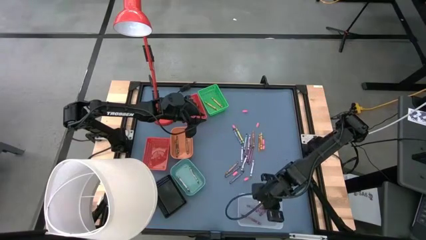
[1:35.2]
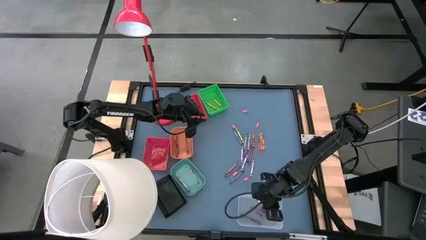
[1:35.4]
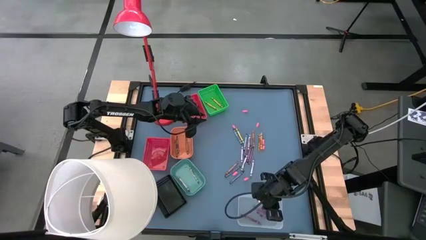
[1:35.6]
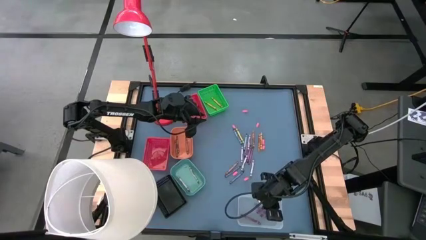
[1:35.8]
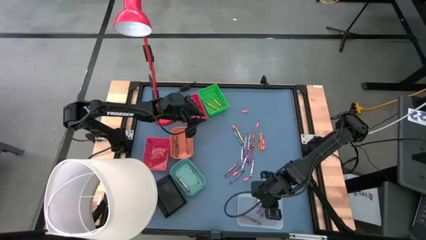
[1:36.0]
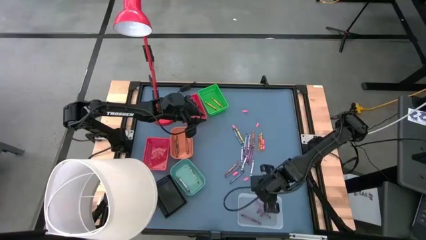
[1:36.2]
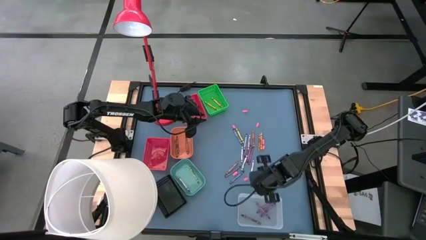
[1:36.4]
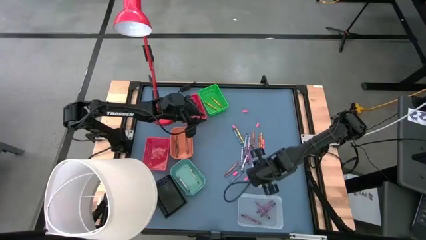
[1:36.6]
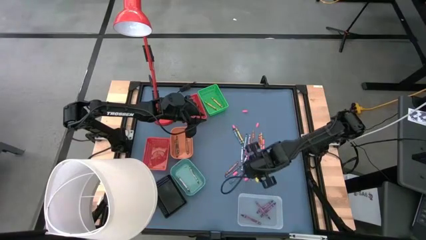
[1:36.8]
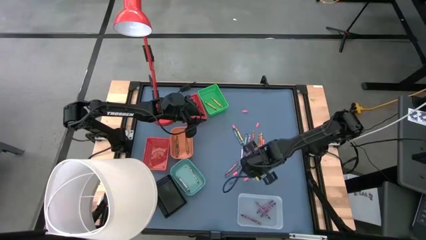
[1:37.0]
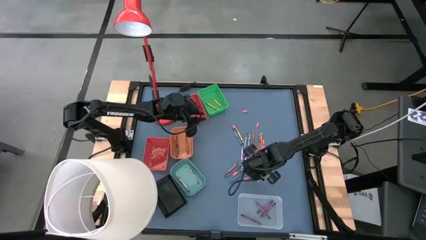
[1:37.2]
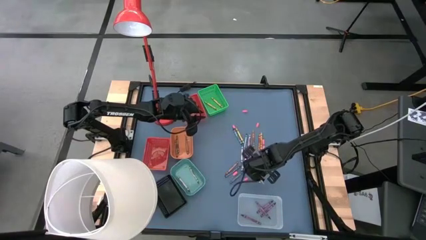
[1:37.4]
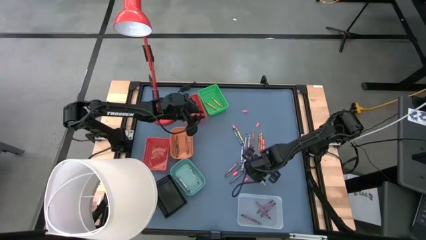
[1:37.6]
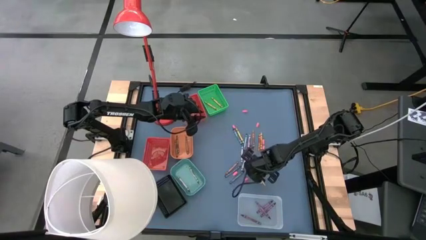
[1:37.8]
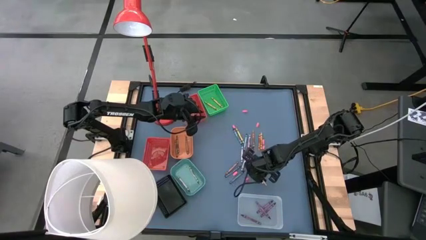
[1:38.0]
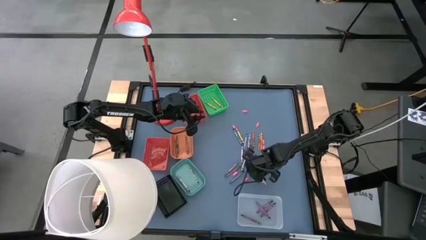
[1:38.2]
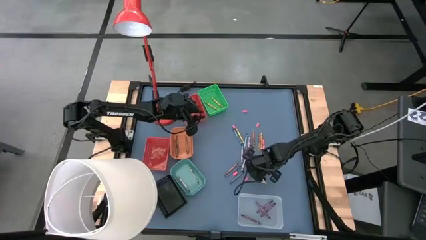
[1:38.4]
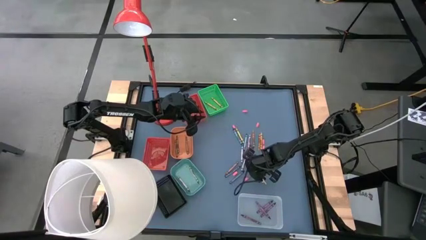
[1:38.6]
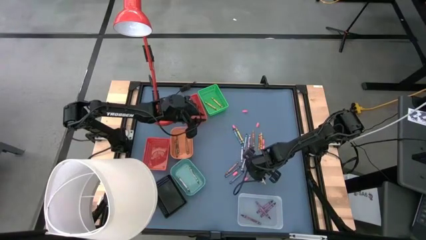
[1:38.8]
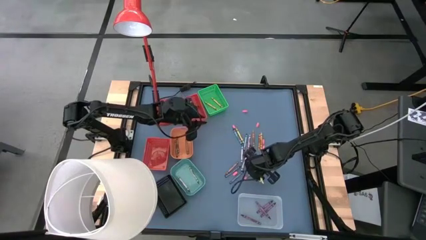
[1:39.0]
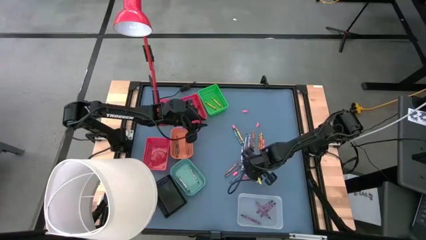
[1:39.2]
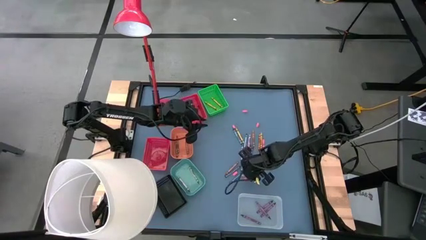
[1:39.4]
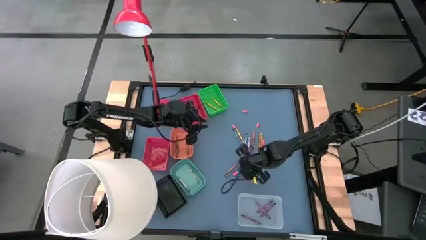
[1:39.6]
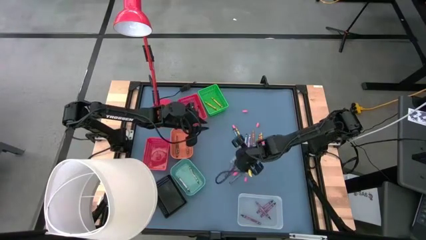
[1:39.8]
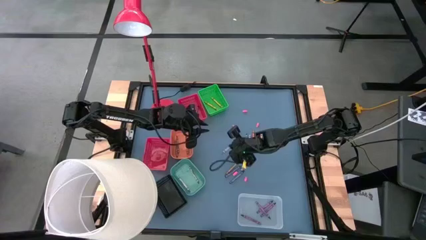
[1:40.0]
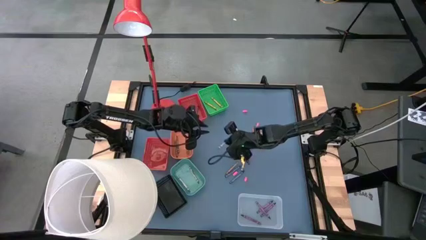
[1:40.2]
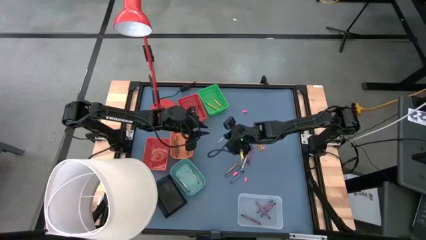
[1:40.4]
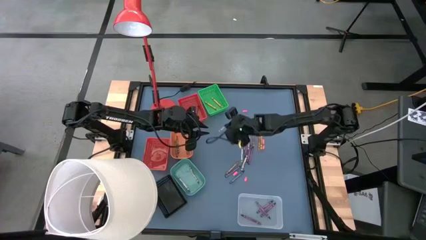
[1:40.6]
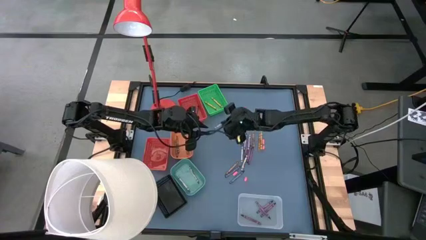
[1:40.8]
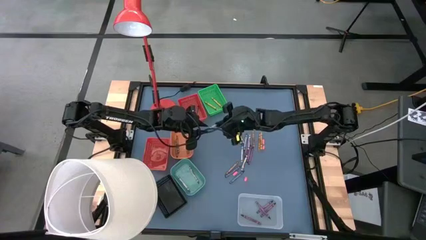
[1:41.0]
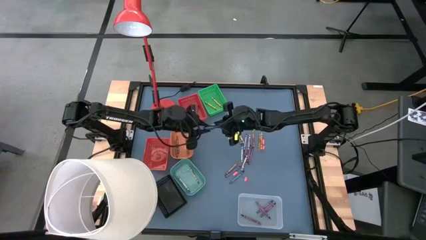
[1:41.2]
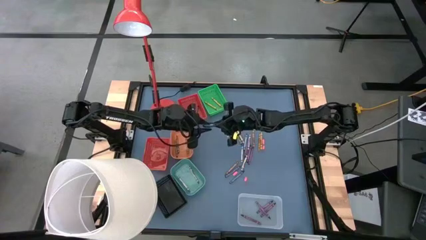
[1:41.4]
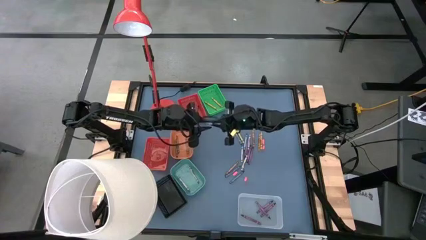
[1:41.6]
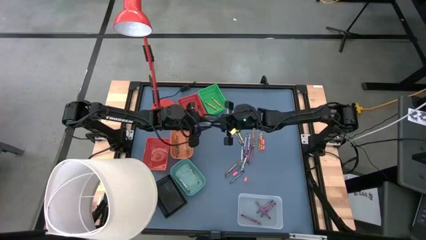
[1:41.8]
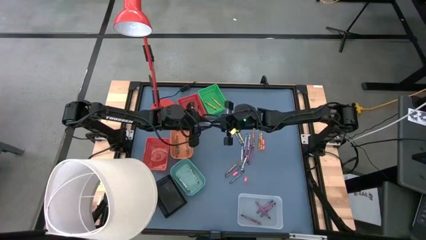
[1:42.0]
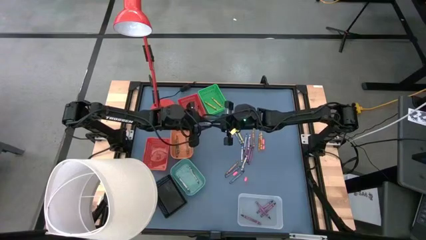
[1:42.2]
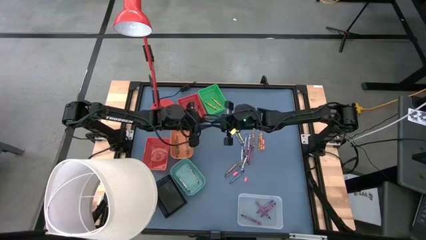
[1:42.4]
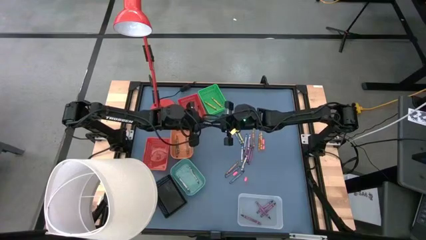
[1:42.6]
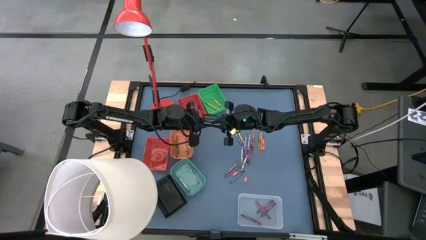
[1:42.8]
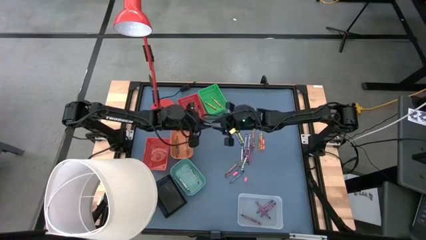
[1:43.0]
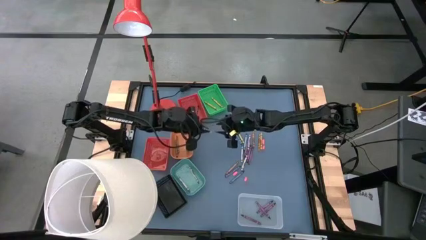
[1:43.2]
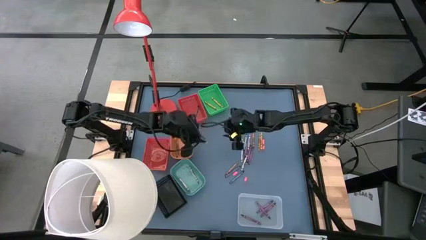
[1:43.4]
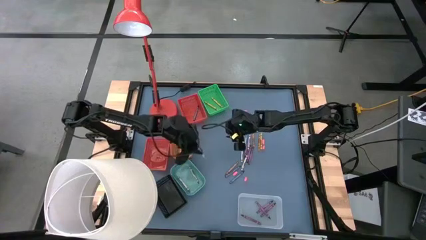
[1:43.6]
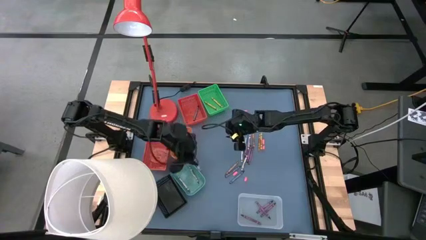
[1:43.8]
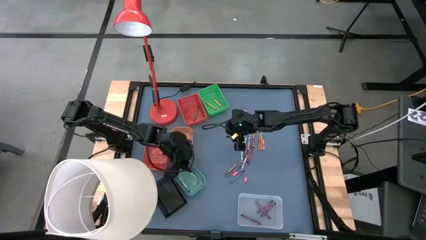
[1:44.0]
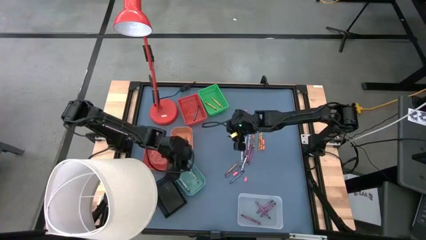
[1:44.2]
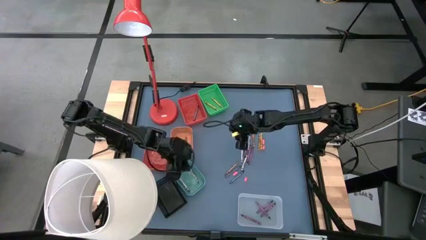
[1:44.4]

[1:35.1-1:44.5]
Task: Sort crayons
Put the gray crayon into the light green bin

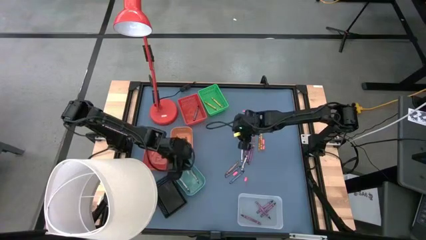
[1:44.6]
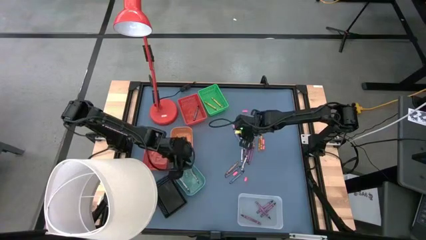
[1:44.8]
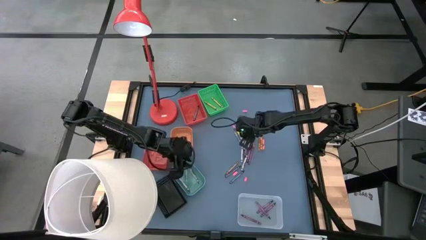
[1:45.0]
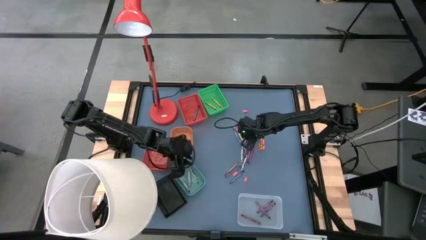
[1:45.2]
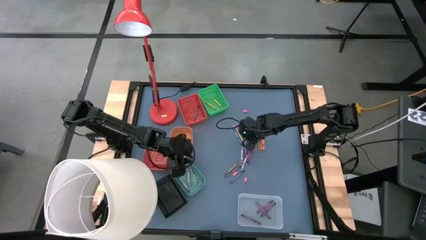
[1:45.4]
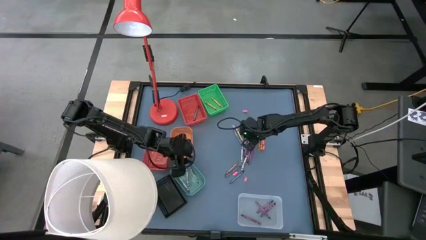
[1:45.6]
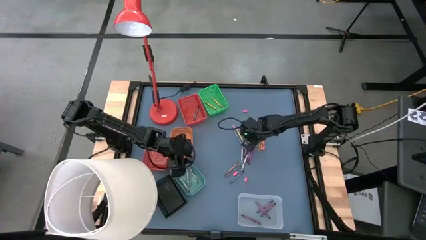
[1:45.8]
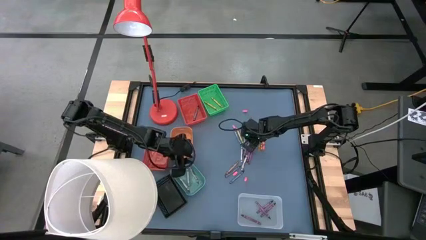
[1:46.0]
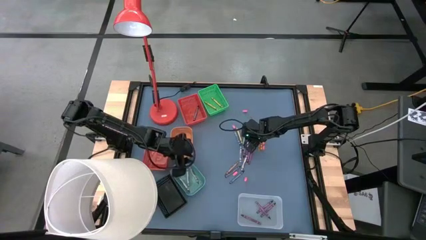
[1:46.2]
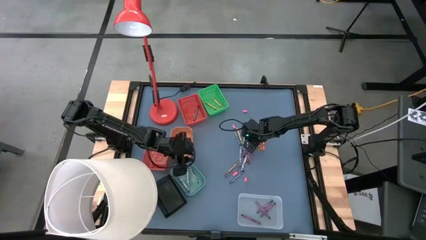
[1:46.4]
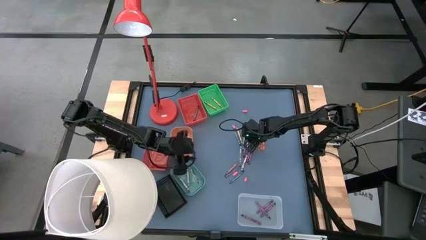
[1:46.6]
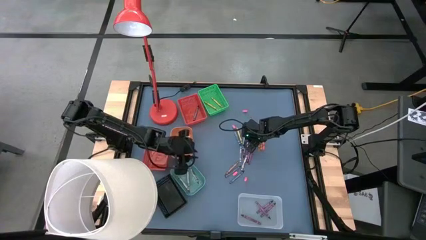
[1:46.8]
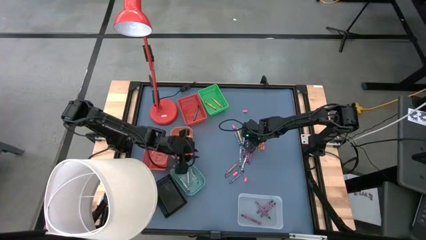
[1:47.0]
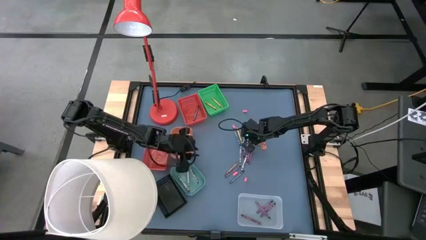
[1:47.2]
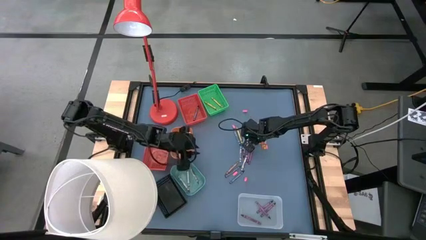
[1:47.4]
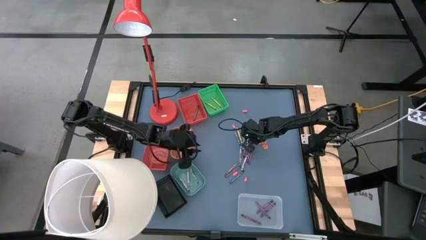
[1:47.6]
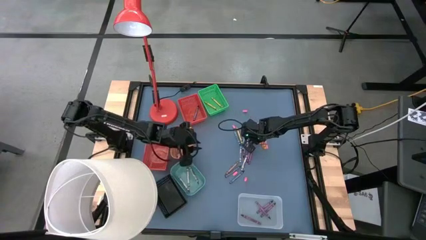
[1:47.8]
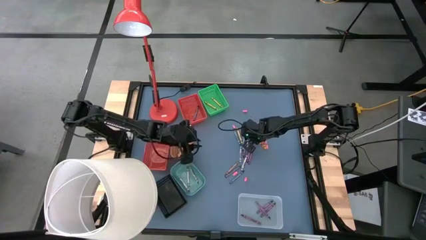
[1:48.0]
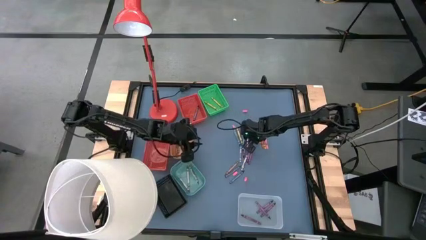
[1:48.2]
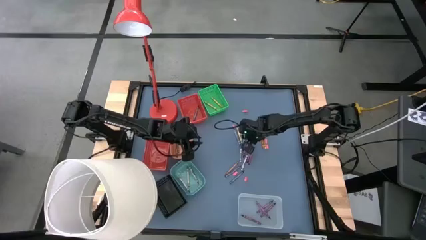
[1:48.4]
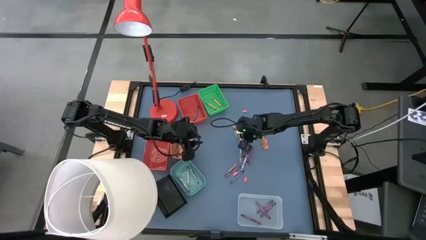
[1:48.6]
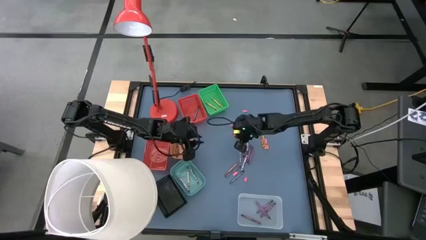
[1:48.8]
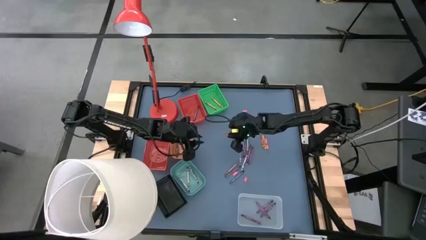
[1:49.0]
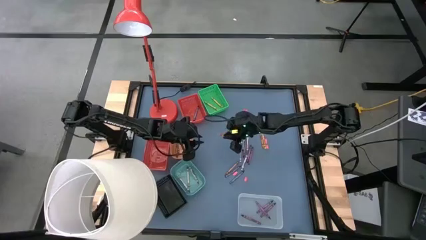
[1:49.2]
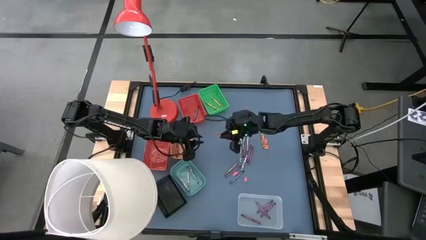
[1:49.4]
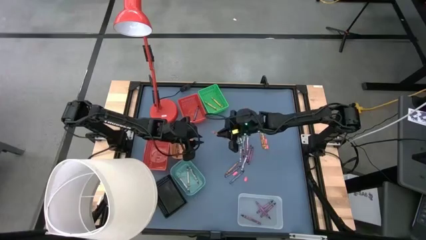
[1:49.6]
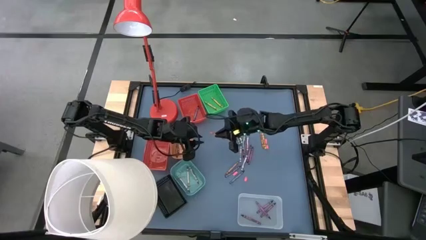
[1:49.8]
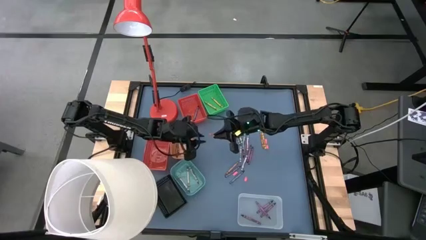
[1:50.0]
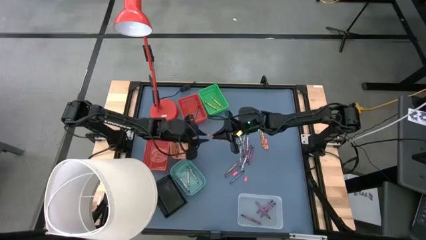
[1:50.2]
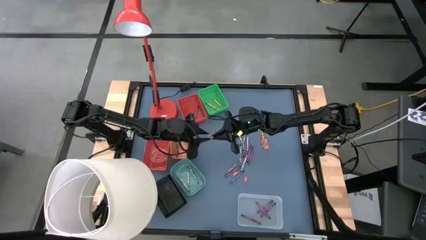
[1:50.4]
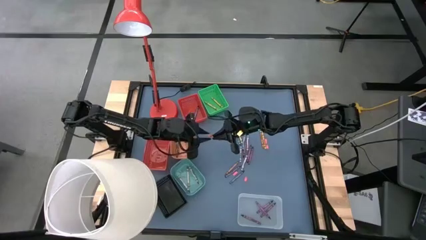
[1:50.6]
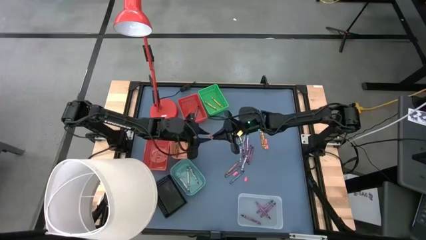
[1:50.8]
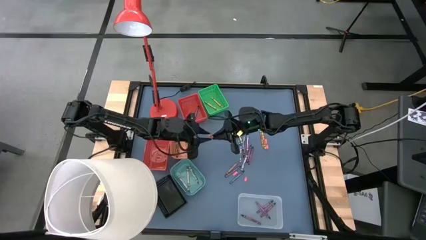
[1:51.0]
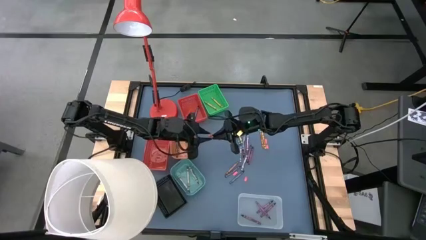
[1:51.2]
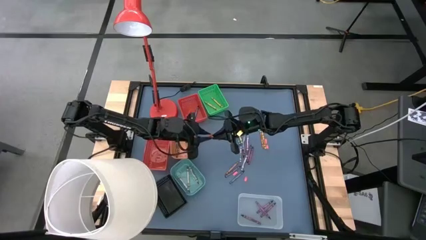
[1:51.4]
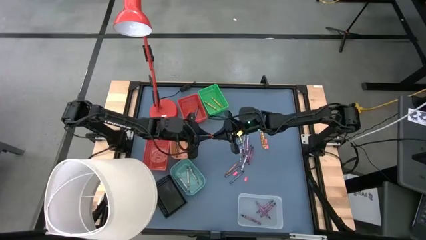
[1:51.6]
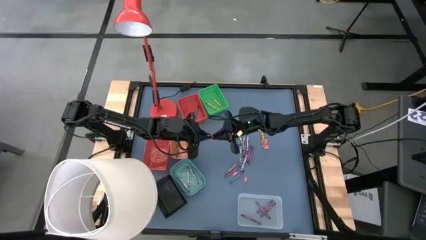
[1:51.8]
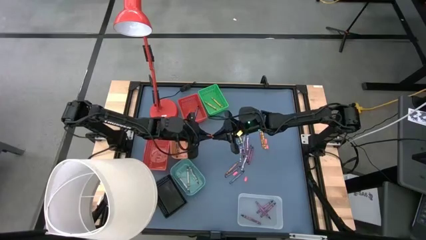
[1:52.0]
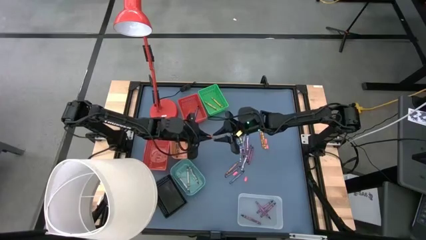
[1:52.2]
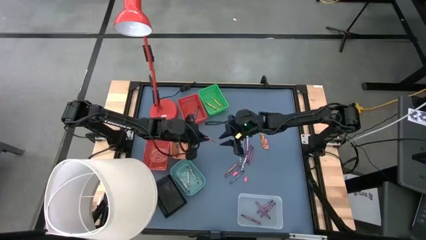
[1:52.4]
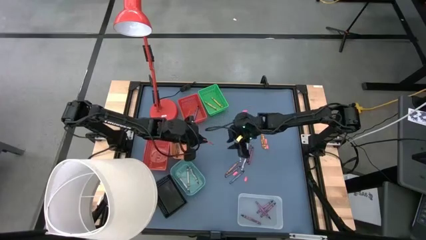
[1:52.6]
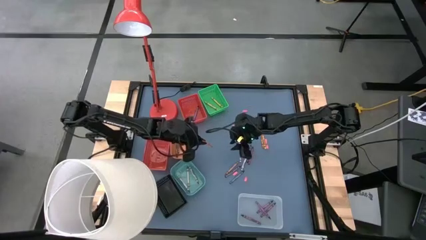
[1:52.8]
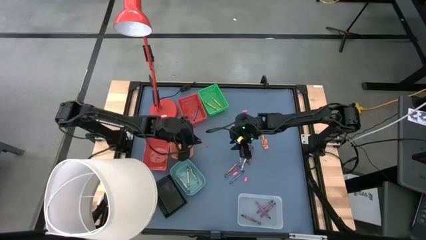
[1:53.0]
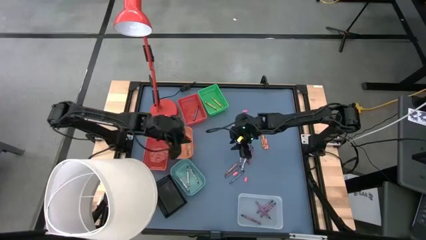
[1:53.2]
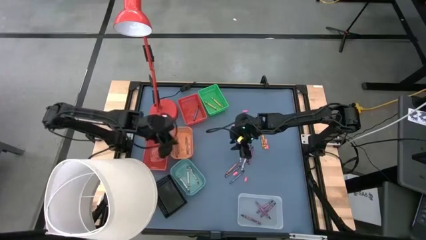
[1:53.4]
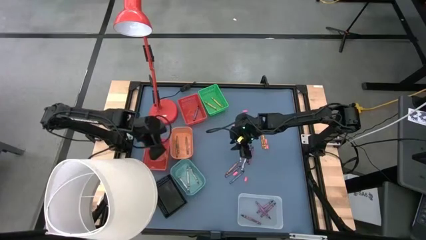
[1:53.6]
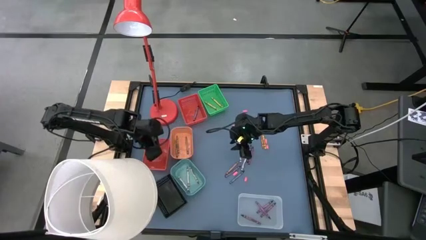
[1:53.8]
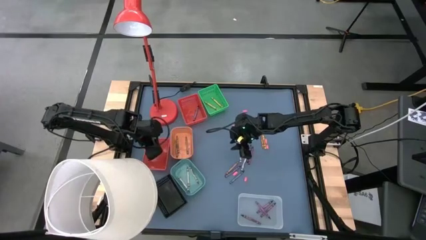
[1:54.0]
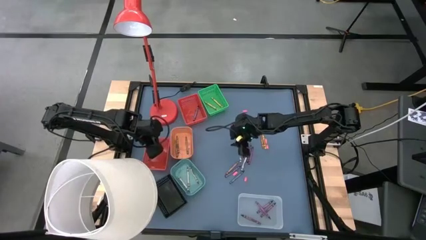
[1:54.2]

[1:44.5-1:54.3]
Put the orange crayon into the left red basket
